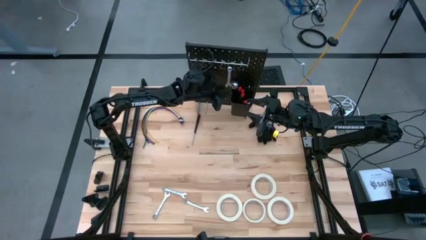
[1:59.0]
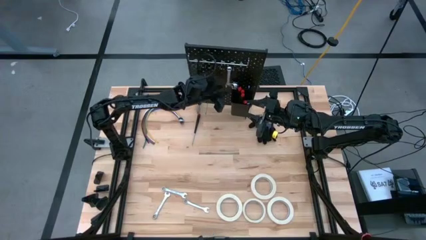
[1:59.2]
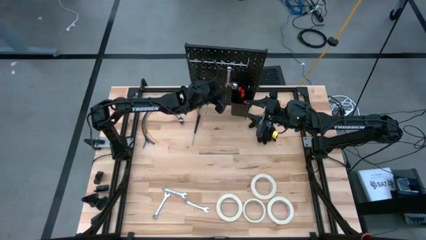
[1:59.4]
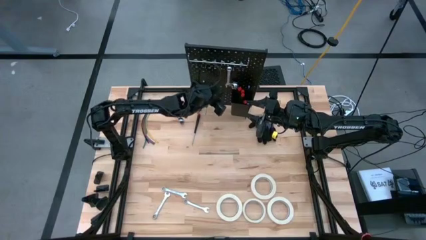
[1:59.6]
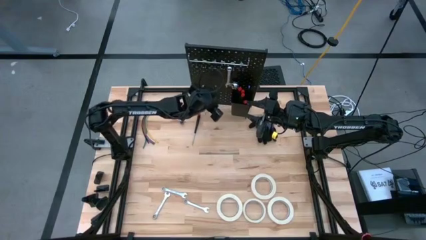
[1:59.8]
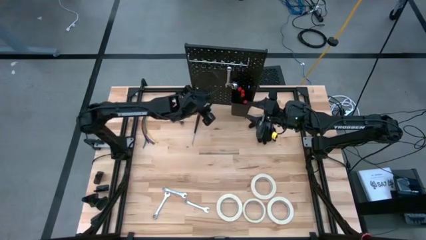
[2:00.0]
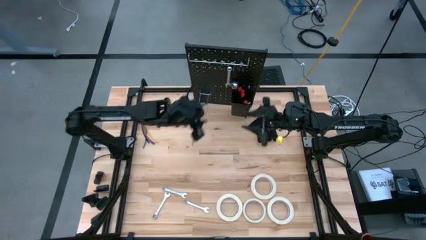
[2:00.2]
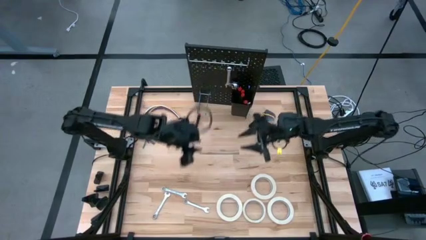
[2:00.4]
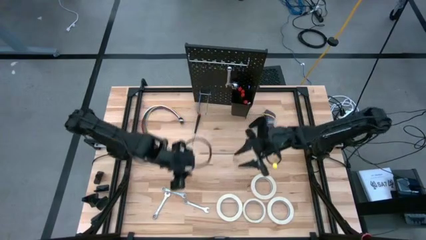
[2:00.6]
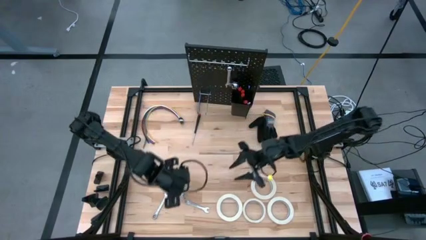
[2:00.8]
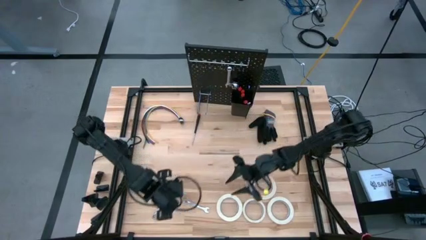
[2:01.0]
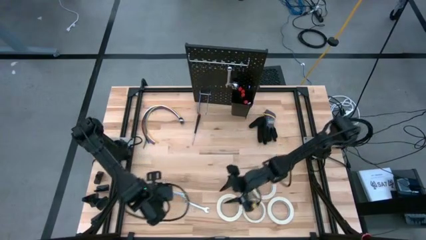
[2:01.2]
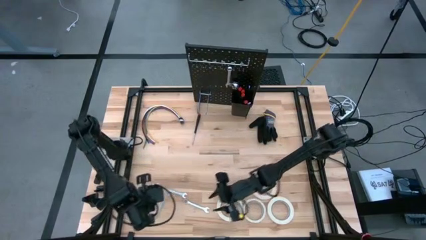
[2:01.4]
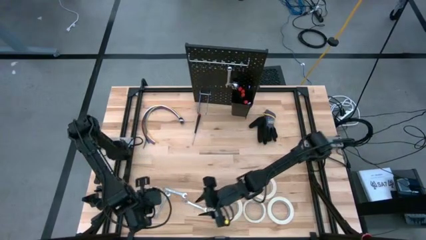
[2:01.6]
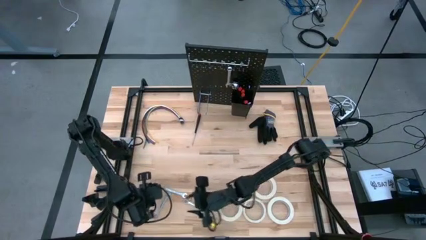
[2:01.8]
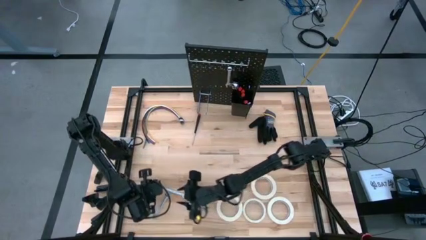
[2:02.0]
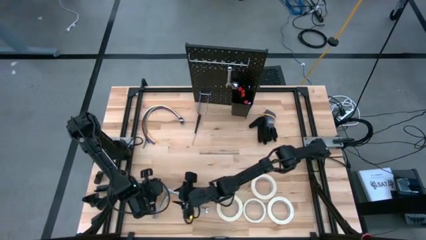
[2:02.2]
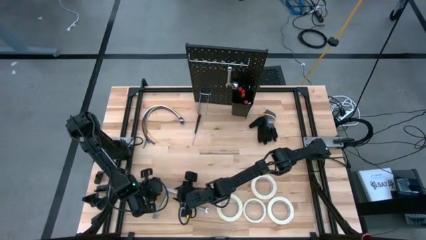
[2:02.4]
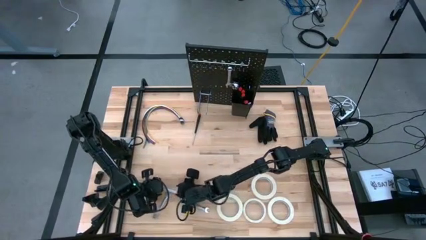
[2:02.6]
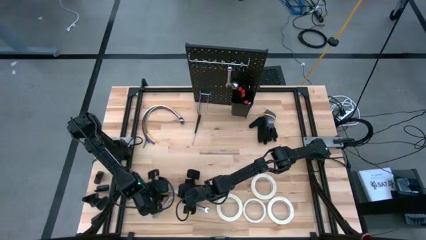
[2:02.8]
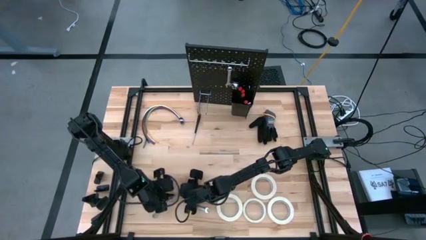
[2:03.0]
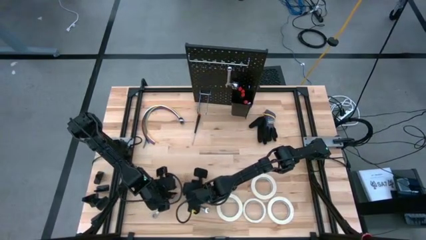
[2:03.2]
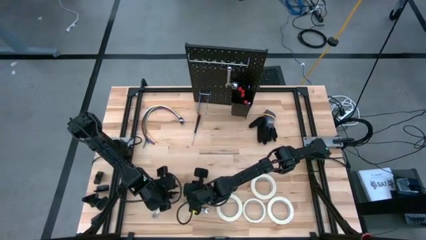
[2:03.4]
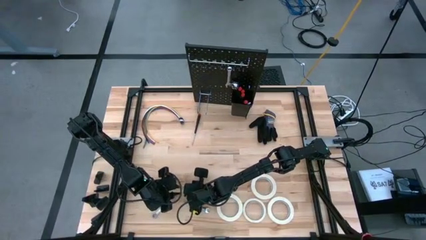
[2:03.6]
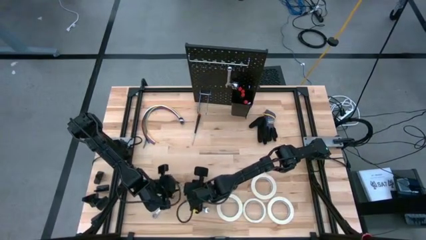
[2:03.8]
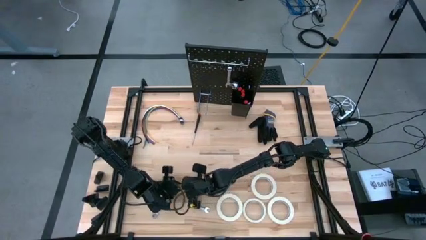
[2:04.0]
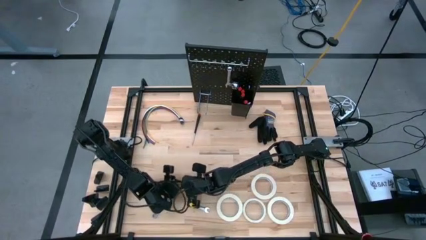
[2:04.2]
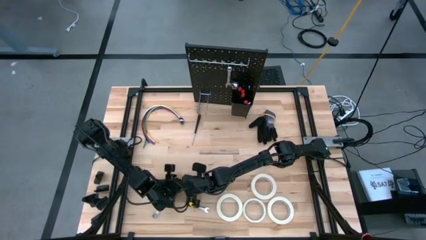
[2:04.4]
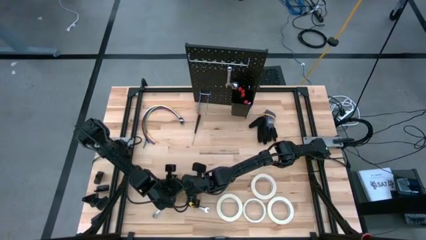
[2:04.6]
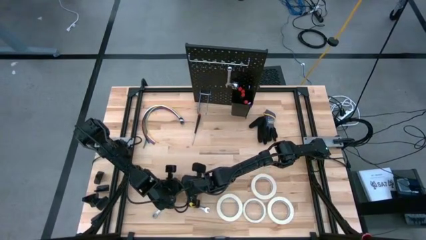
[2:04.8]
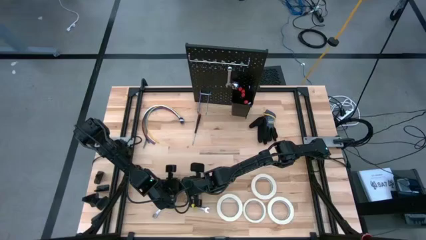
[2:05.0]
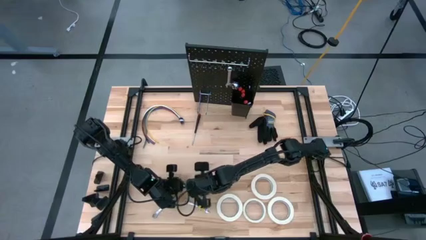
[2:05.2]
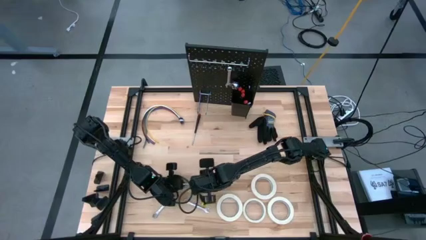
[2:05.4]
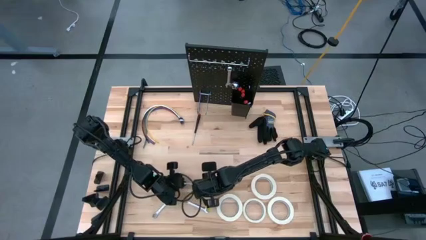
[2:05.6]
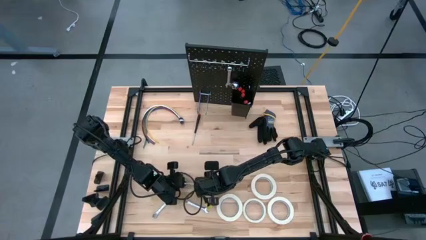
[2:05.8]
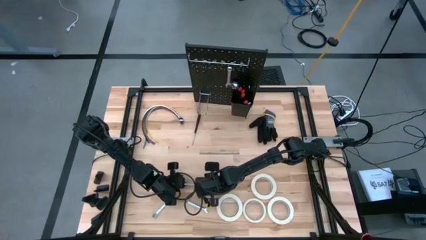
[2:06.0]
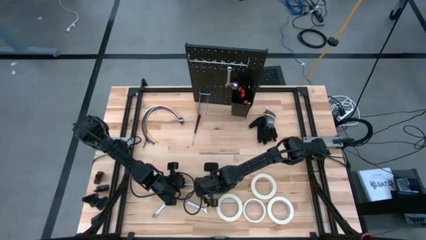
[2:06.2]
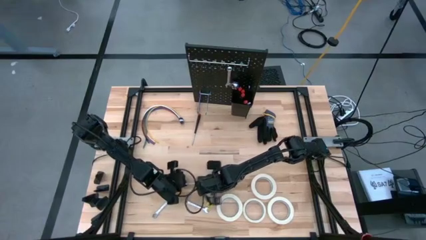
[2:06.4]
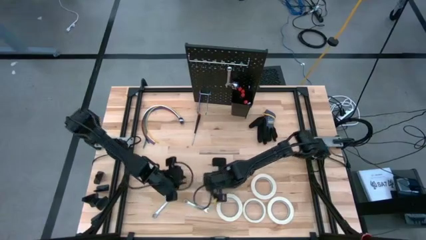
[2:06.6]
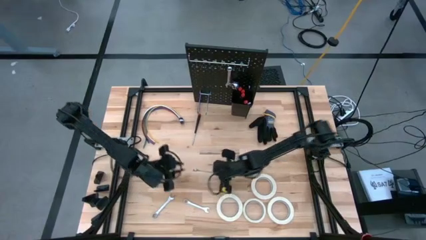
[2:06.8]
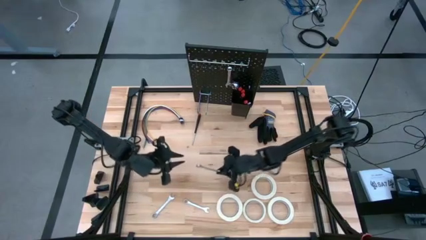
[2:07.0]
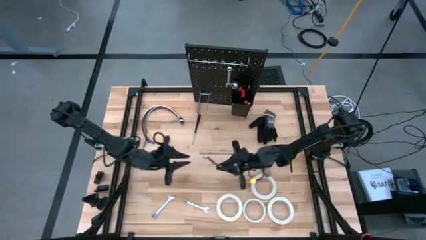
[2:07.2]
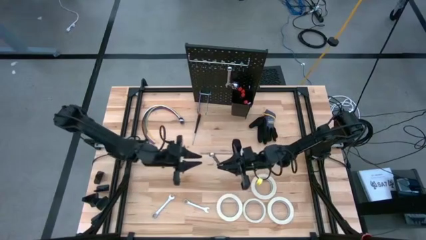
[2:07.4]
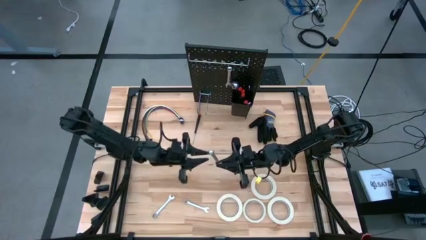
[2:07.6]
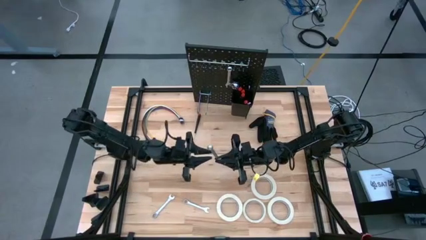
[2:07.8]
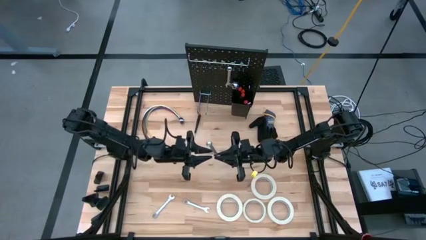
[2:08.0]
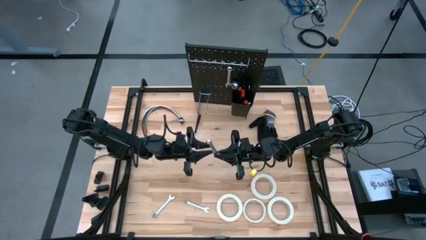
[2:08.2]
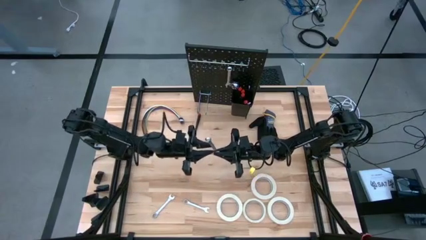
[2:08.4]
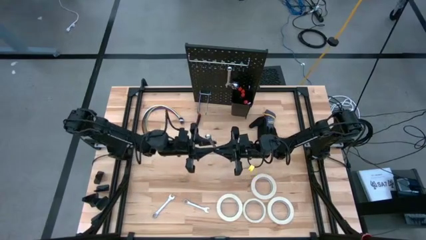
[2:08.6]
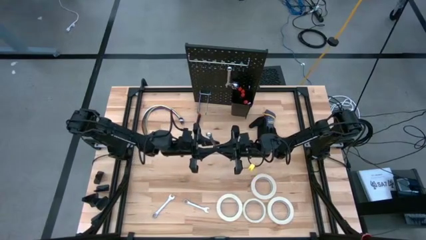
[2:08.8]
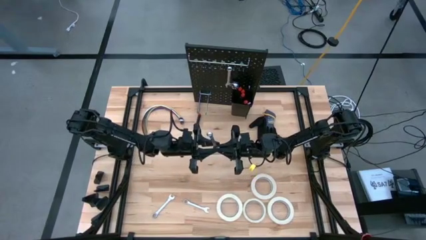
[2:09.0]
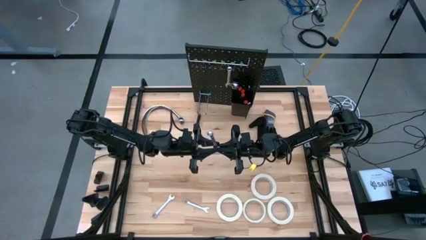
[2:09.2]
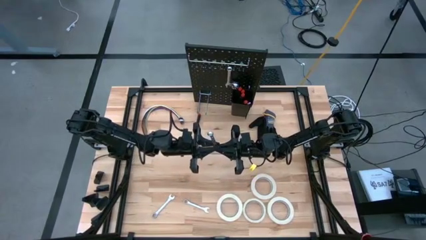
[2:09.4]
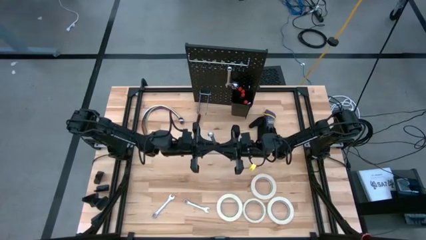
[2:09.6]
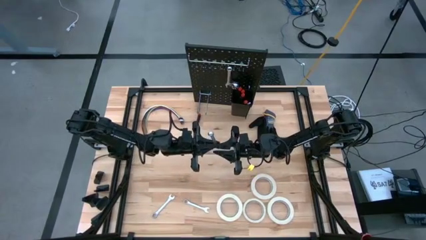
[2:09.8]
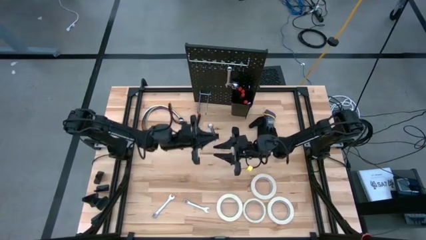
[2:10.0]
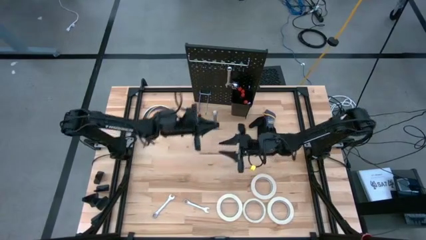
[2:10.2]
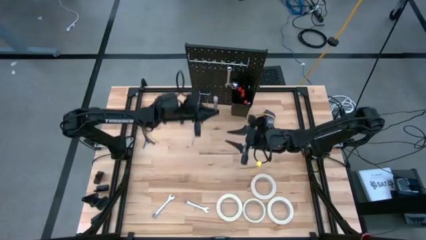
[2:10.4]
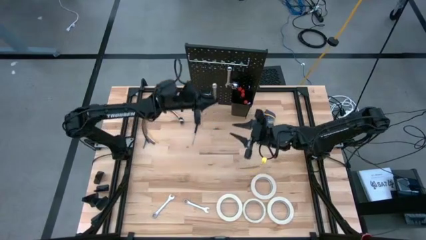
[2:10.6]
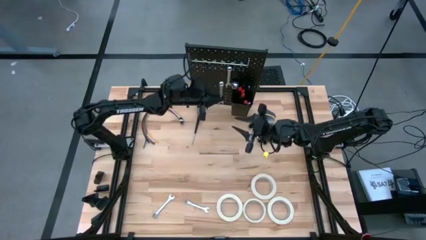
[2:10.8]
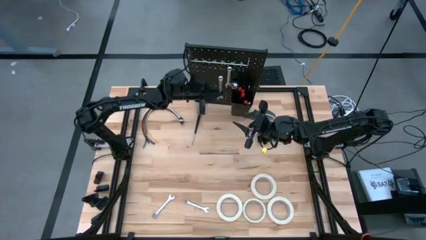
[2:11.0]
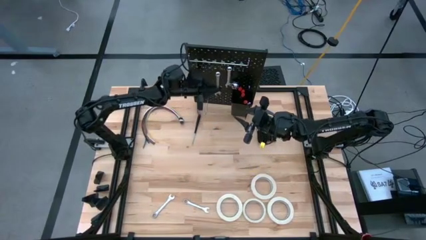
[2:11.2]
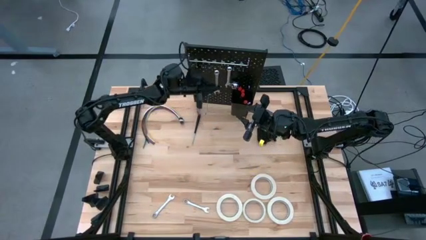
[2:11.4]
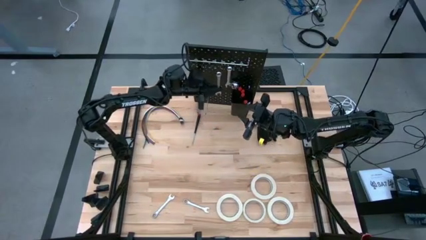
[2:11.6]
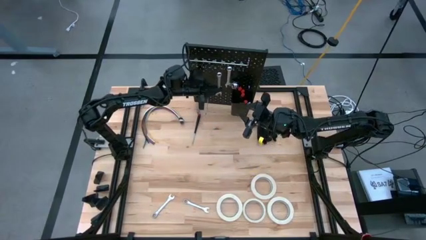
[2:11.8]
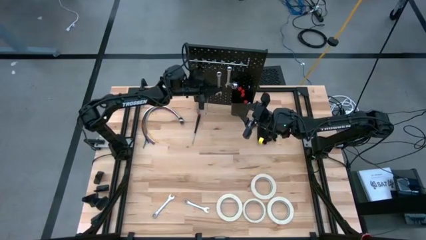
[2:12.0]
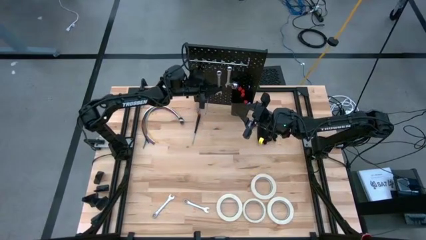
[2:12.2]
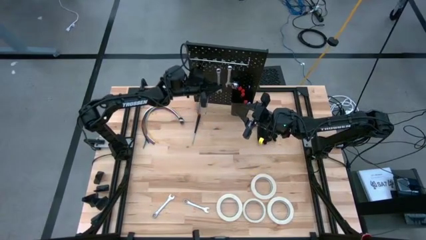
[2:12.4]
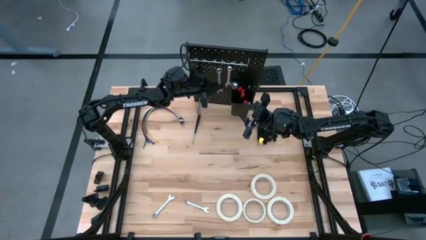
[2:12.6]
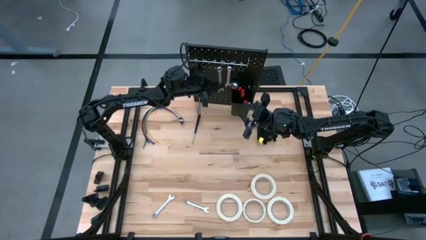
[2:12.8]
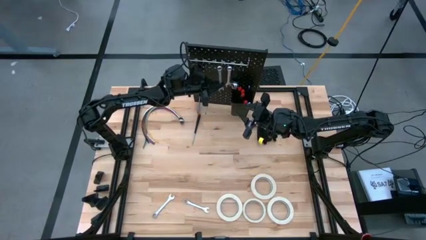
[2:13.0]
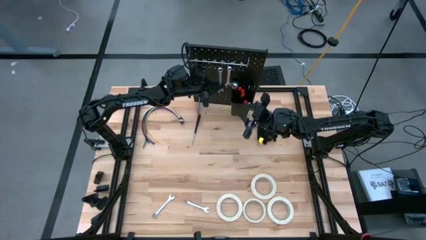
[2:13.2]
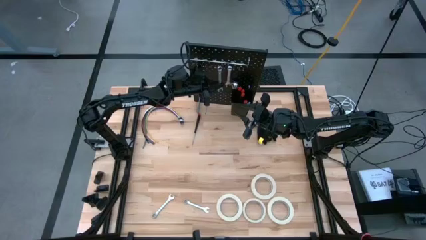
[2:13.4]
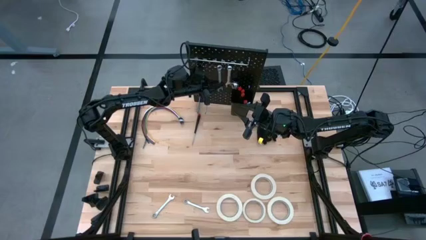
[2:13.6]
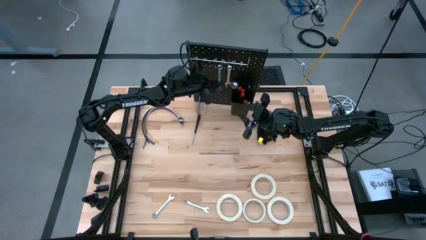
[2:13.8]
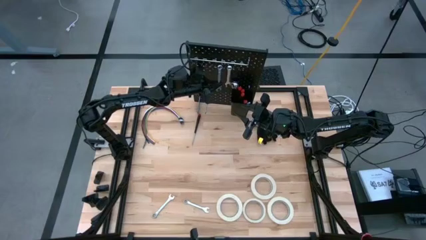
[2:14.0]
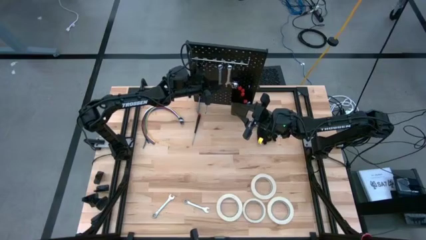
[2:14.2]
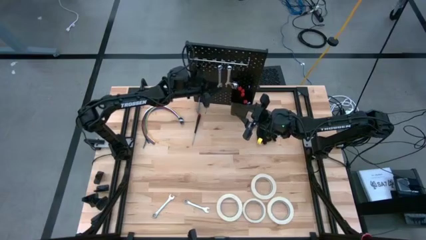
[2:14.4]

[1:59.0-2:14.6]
Task: Hang tools onto peg board
Hang the silver wrench on the peg board

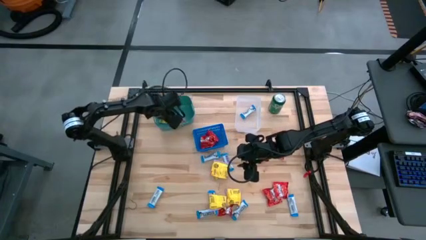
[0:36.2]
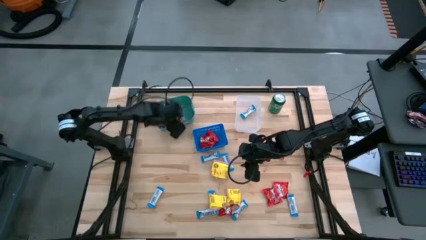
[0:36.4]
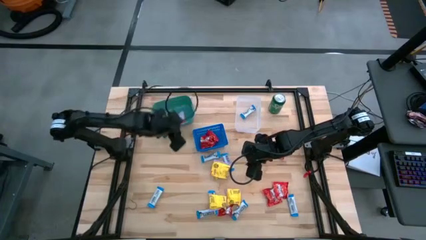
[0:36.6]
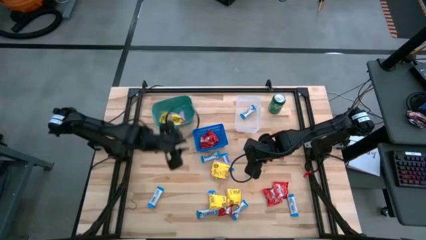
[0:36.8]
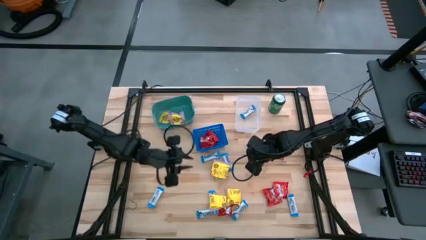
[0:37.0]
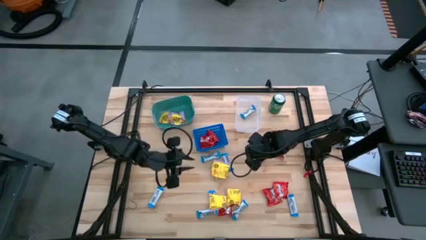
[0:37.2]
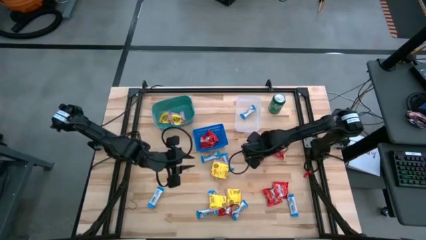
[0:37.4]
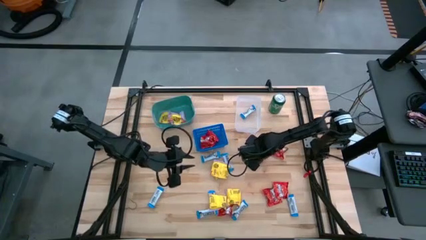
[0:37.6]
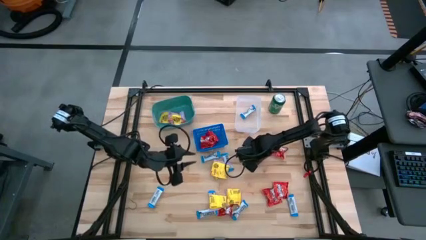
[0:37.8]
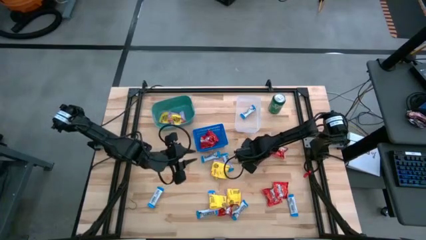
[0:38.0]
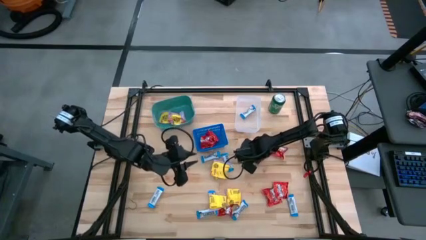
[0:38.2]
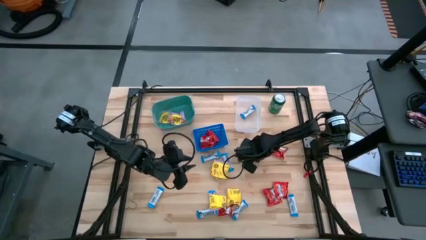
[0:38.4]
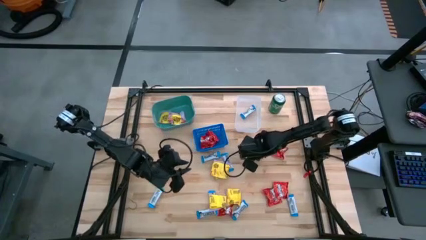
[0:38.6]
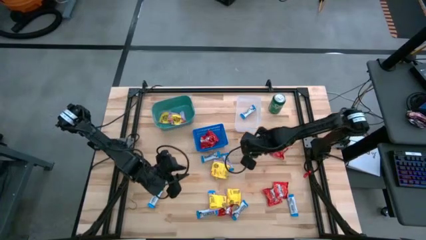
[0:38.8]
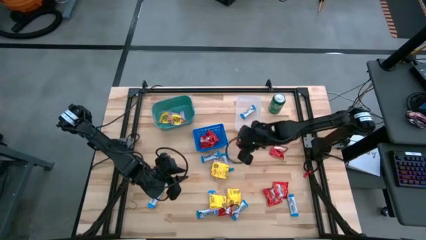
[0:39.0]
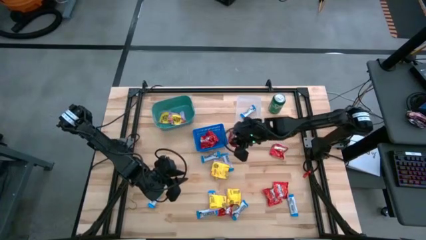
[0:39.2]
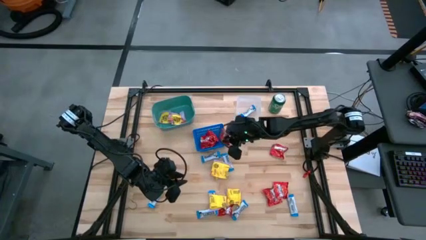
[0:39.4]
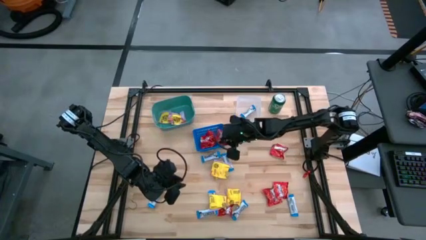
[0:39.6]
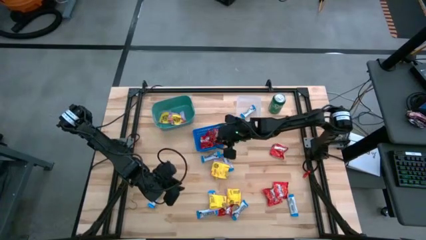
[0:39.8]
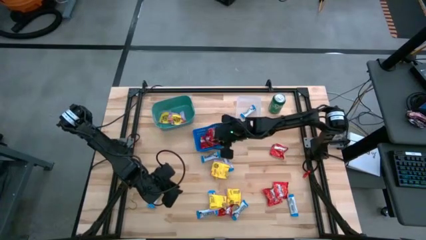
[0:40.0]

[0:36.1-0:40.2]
Task: Sort candy
Put the skittles candy into the blue basket
